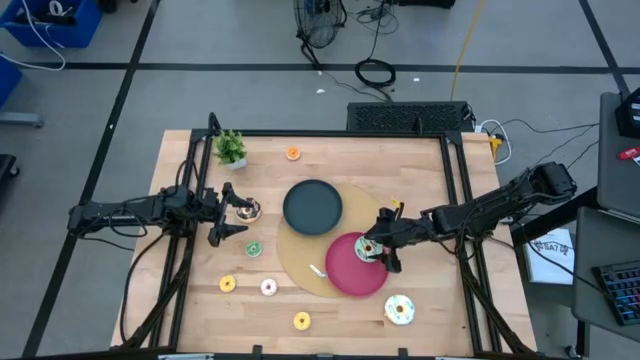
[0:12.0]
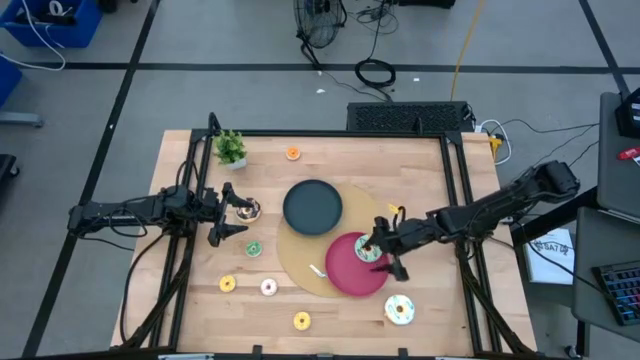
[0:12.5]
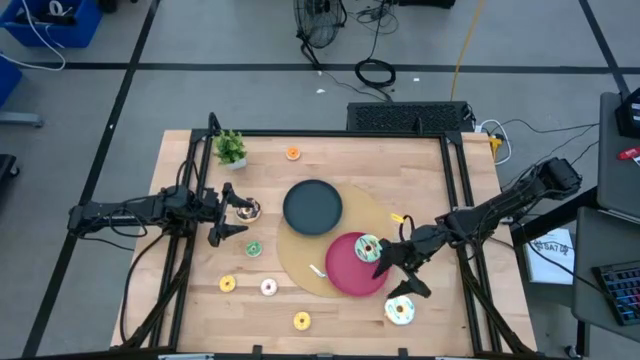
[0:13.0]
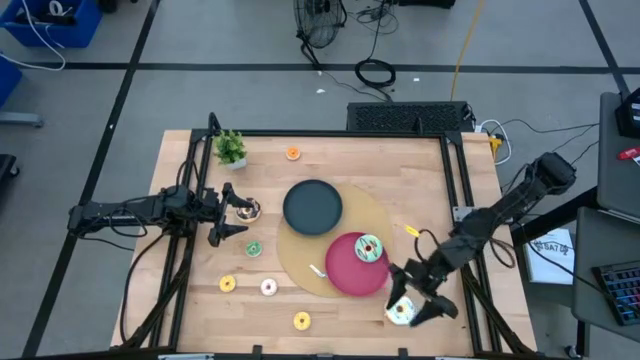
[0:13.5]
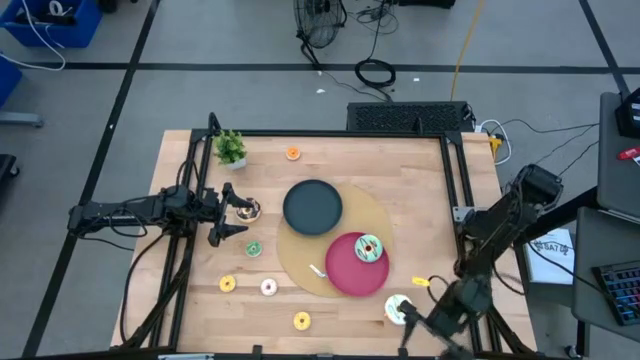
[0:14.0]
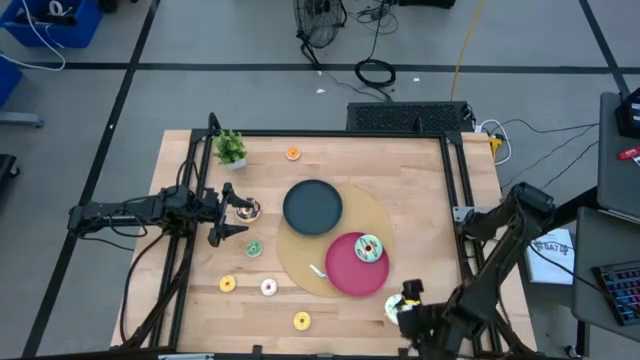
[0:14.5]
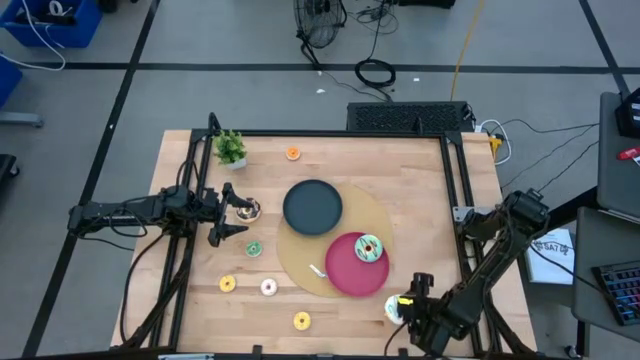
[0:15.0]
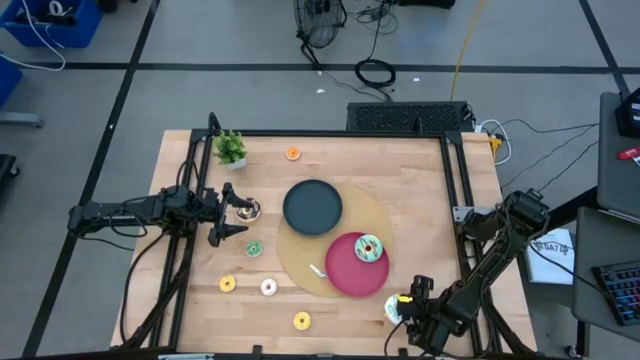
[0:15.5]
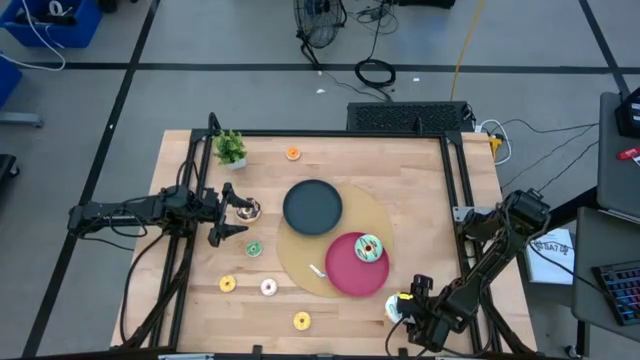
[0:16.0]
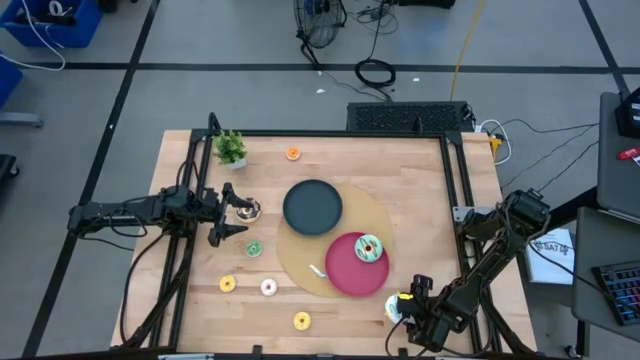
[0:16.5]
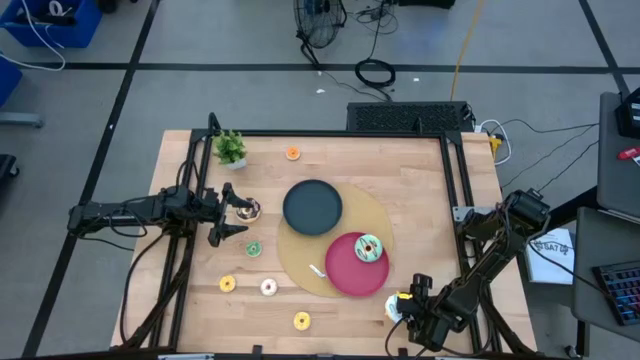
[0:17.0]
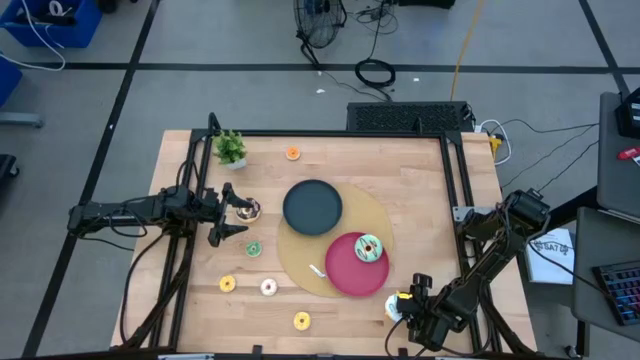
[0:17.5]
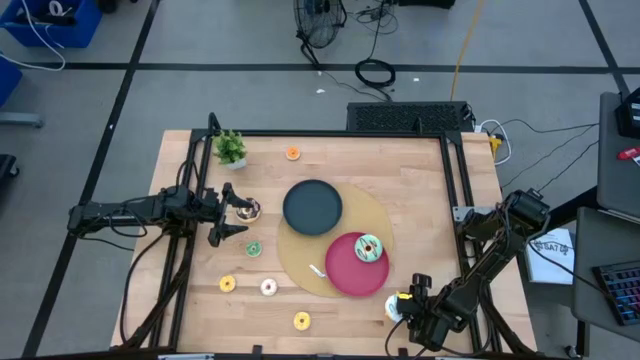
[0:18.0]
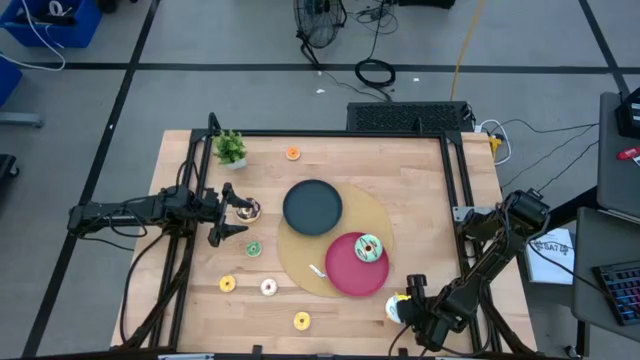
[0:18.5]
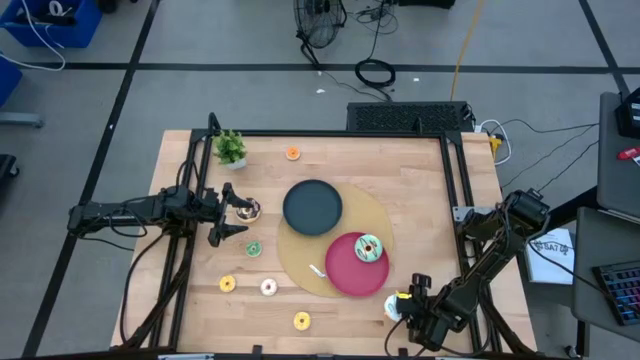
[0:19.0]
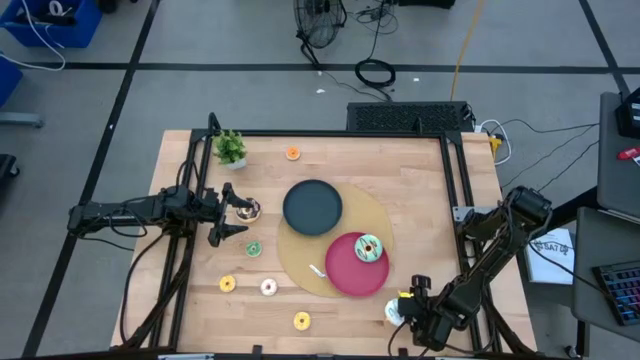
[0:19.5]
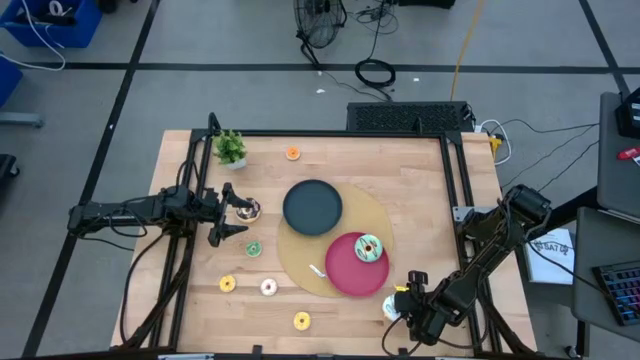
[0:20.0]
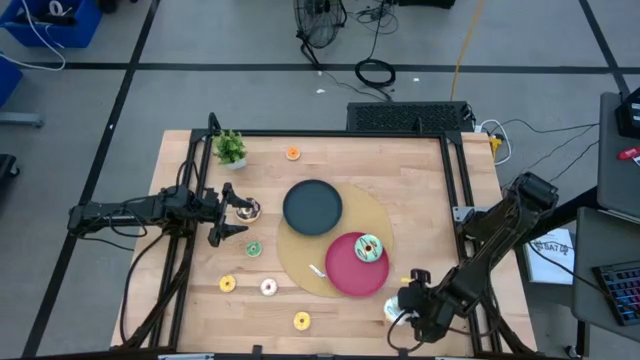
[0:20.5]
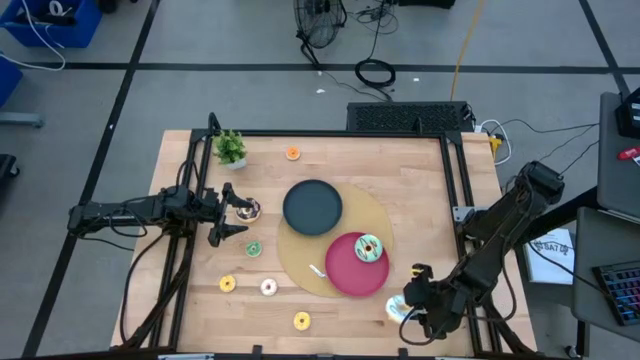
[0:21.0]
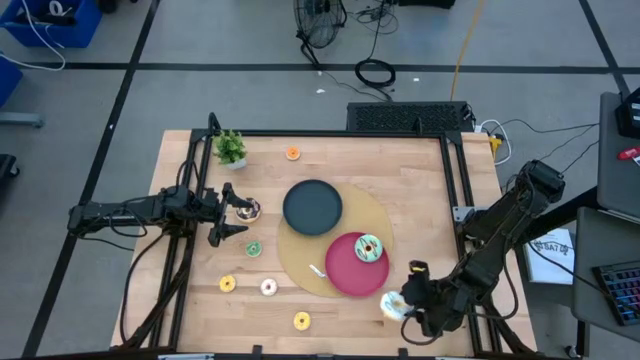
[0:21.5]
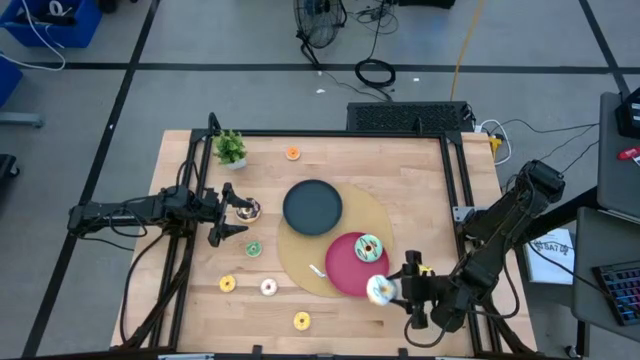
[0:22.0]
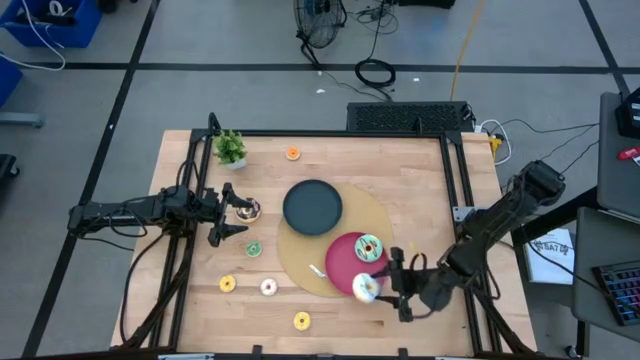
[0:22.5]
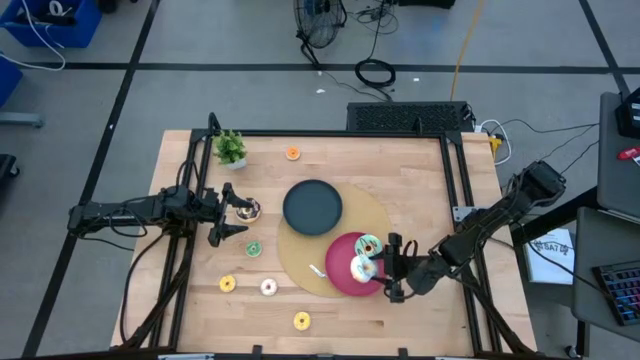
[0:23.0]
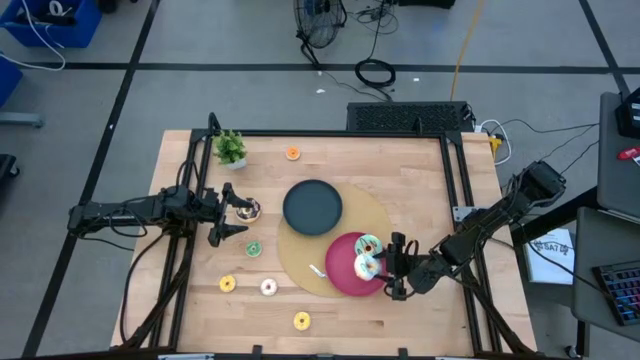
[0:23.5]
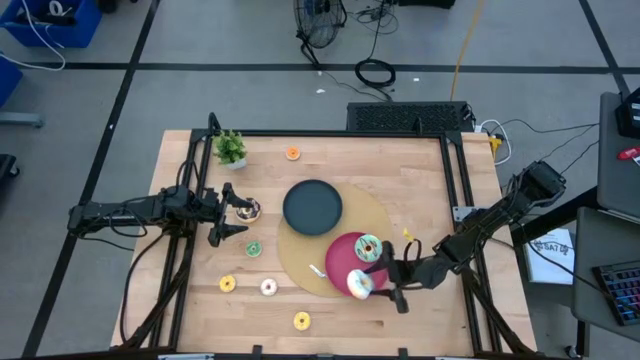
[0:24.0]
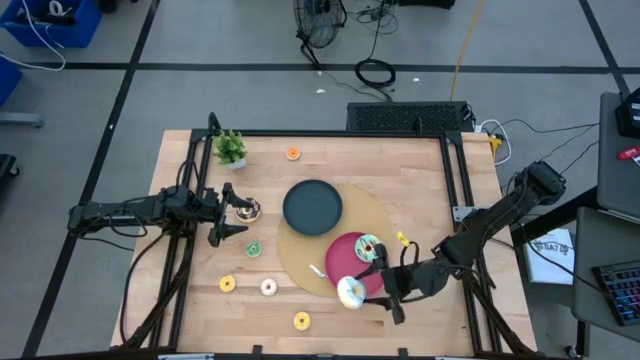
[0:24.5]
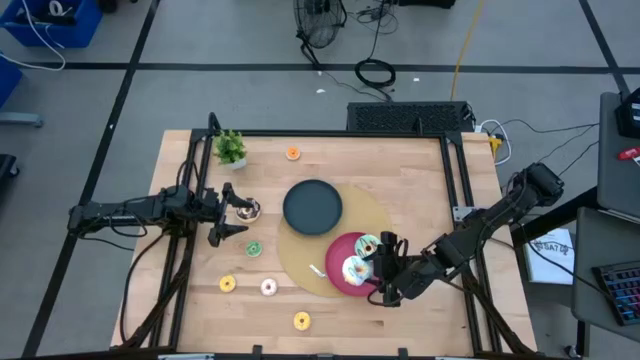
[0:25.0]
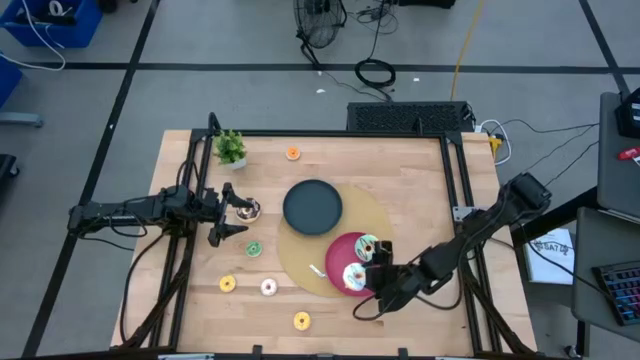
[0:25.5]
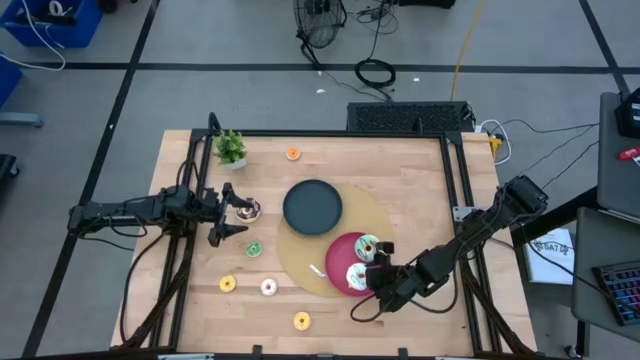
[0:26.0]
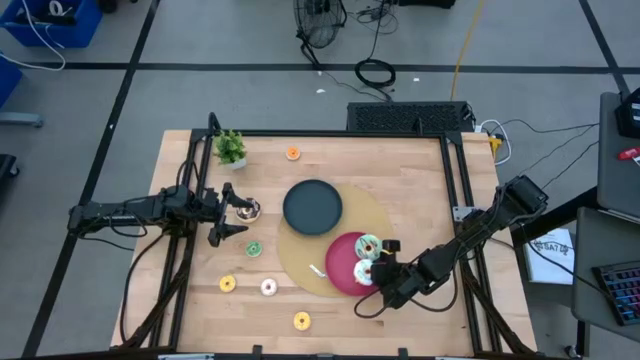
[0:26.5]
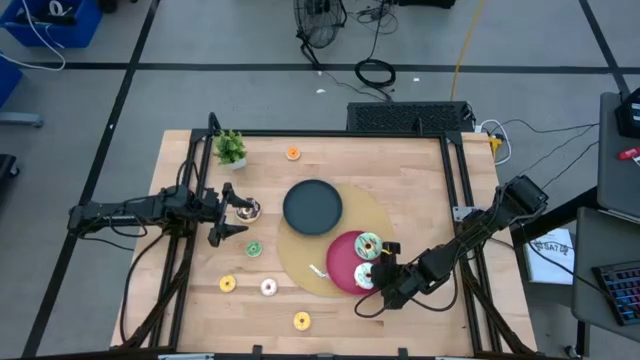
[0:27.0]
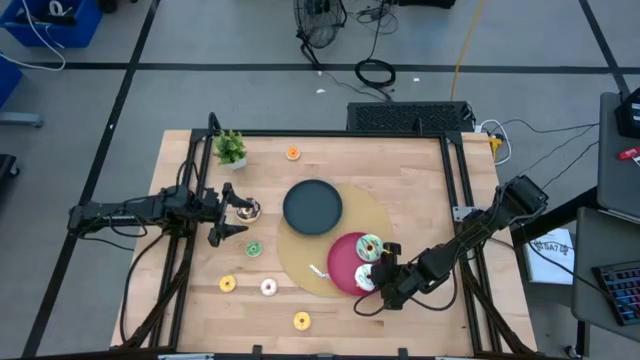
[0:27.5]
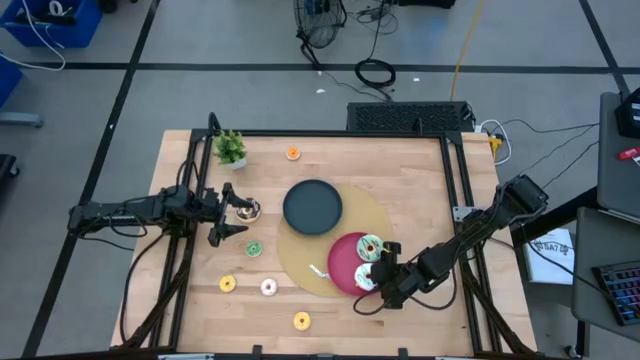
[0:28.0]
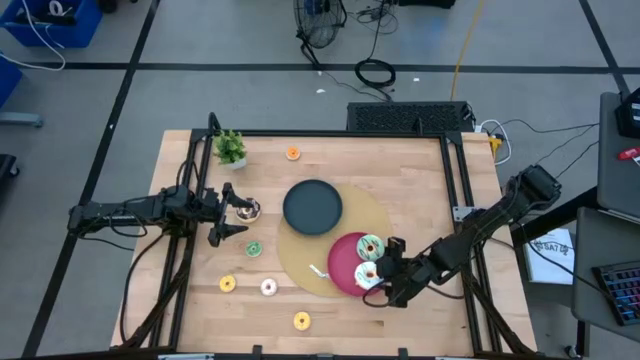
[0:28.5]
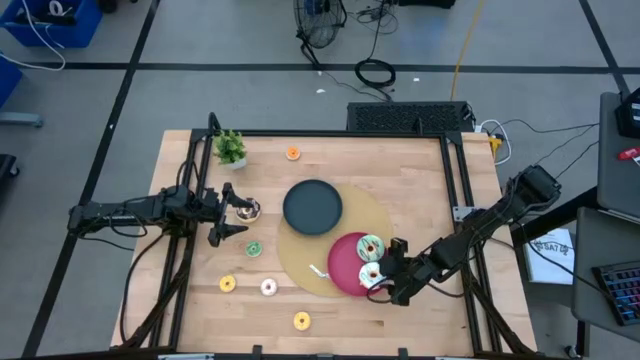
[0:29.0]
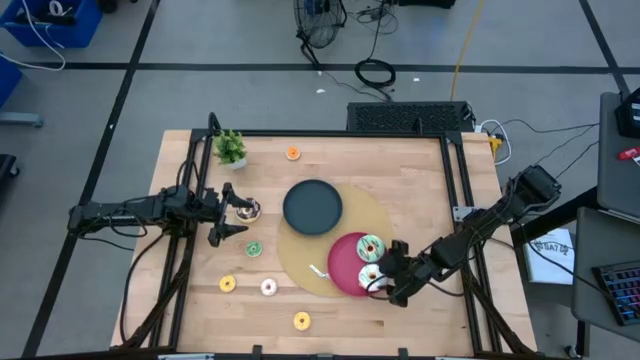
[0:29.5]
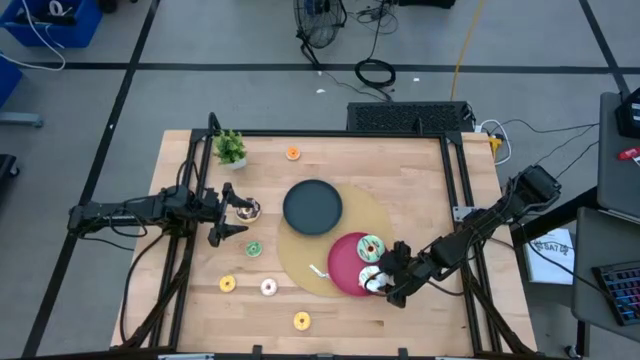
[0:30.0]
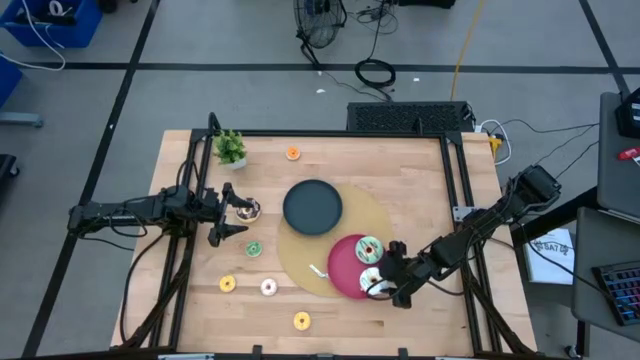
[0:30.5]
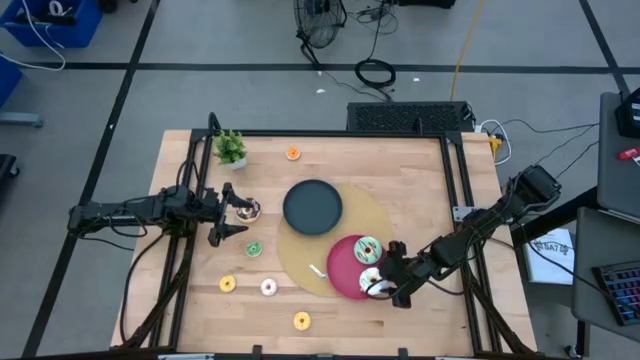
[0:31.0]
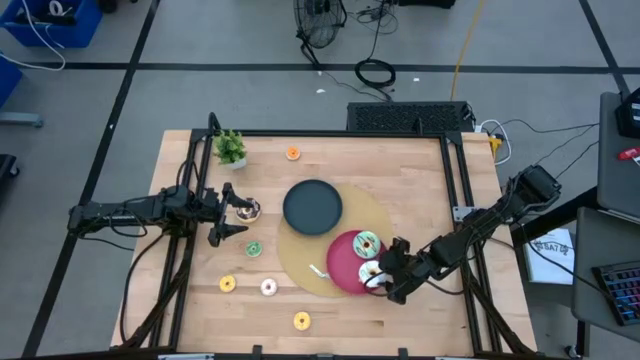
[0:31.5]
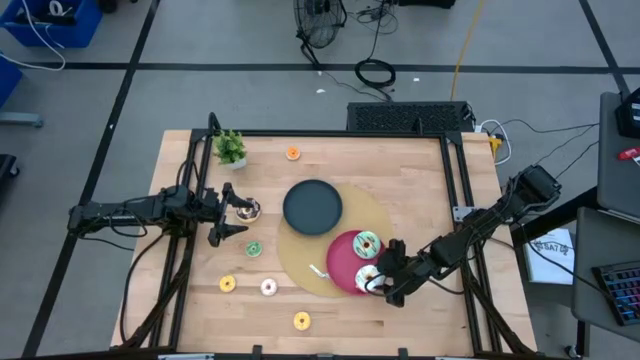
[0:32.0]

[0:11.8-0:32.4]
Task: Pick & Place donuts
Put the large white doughnut on the pink plate
